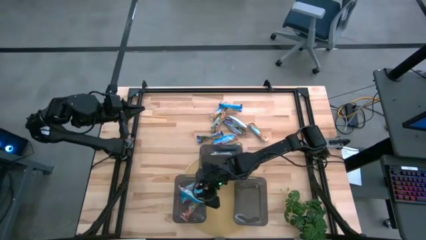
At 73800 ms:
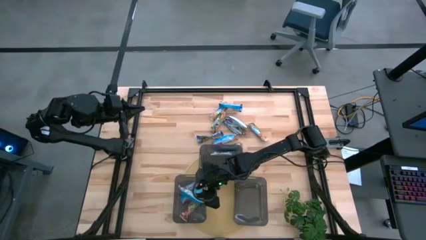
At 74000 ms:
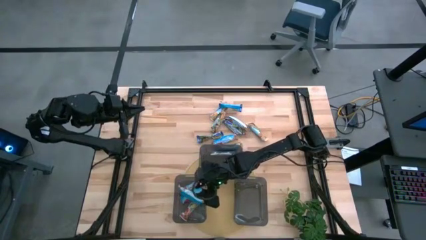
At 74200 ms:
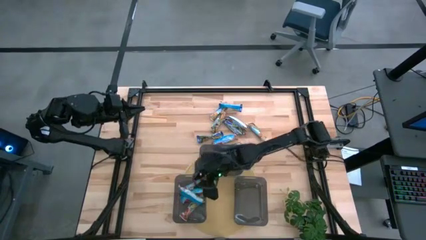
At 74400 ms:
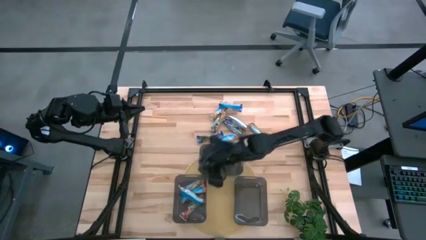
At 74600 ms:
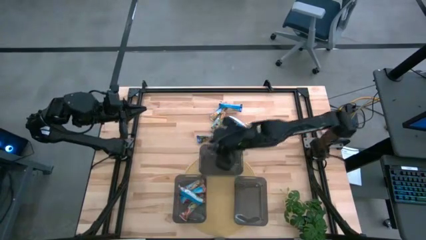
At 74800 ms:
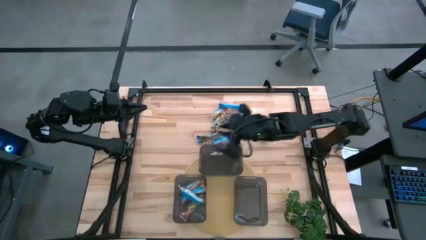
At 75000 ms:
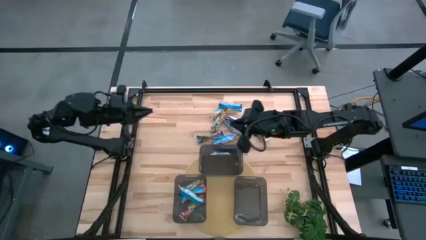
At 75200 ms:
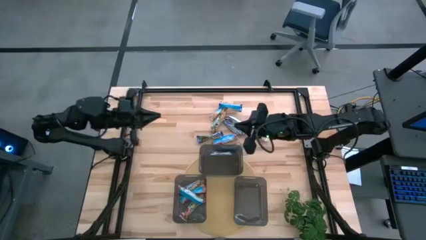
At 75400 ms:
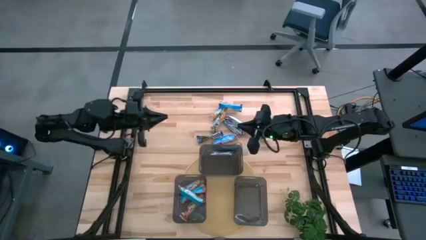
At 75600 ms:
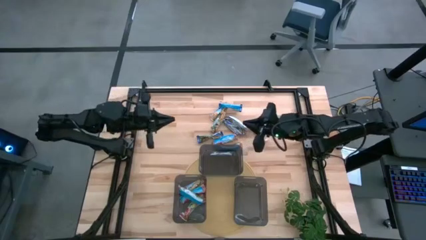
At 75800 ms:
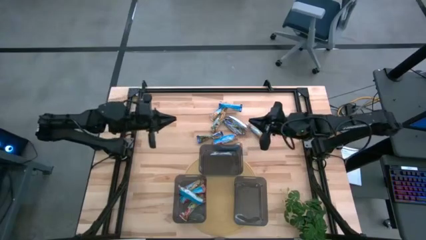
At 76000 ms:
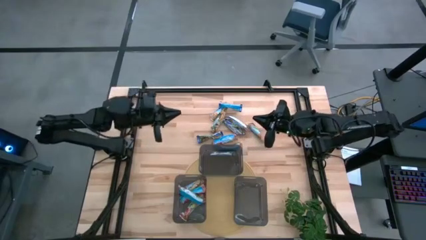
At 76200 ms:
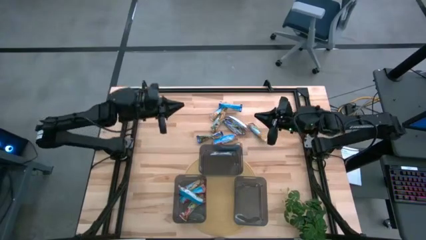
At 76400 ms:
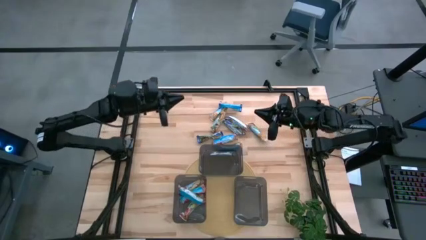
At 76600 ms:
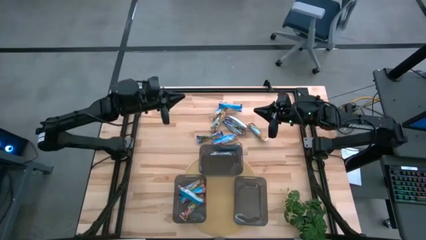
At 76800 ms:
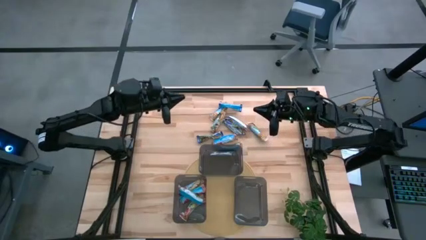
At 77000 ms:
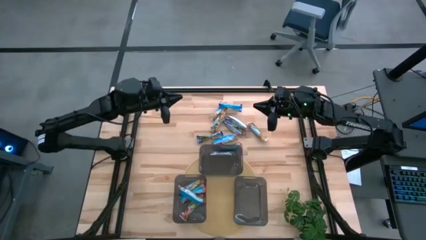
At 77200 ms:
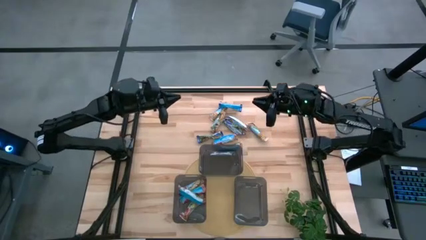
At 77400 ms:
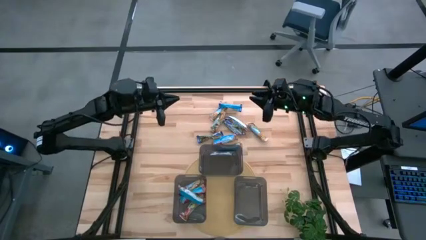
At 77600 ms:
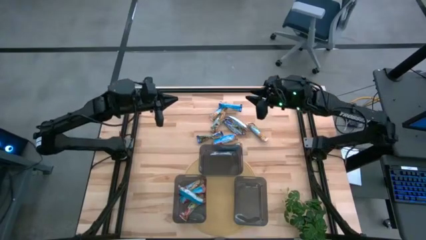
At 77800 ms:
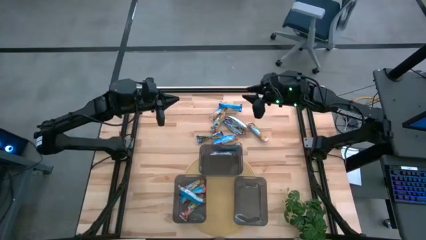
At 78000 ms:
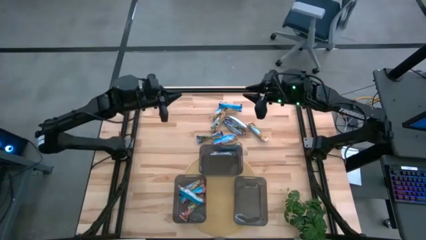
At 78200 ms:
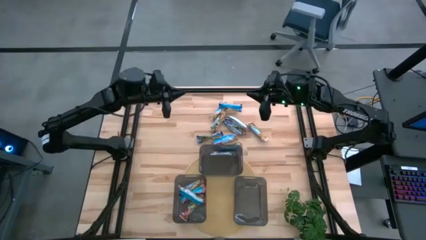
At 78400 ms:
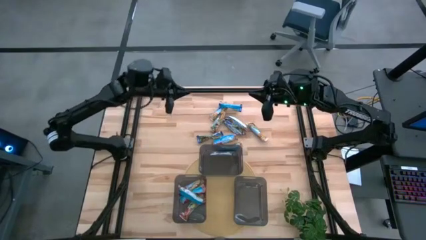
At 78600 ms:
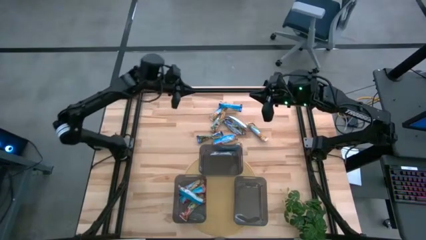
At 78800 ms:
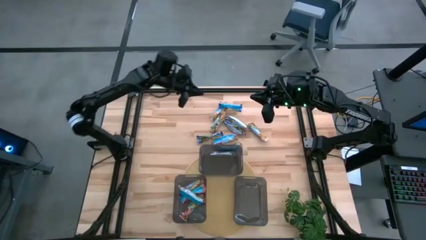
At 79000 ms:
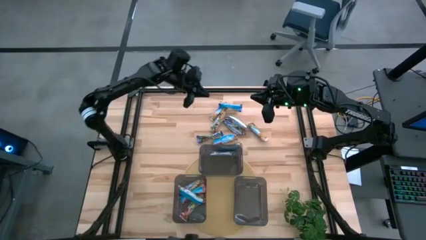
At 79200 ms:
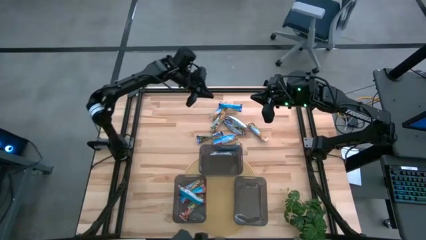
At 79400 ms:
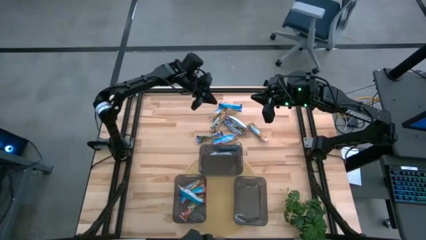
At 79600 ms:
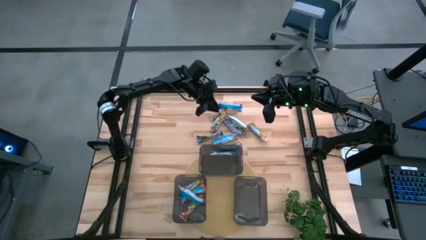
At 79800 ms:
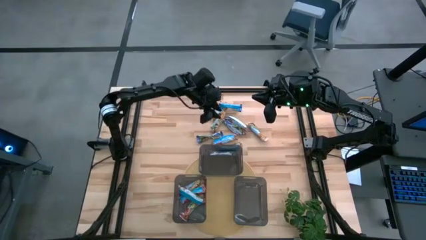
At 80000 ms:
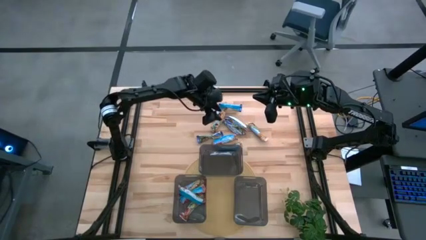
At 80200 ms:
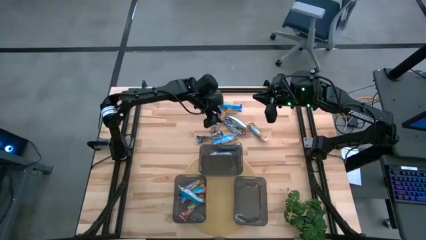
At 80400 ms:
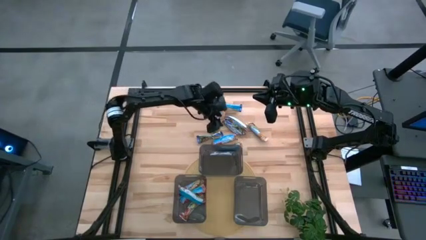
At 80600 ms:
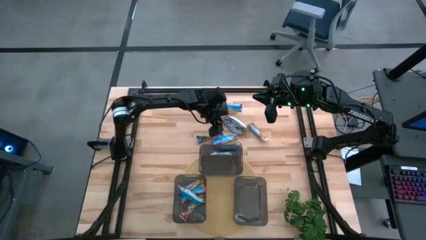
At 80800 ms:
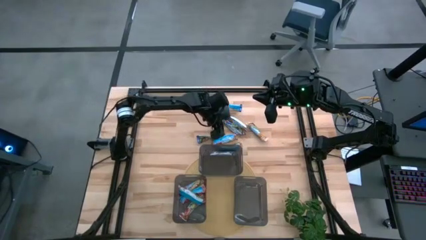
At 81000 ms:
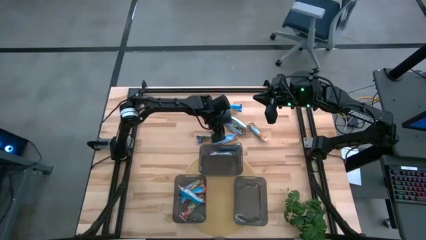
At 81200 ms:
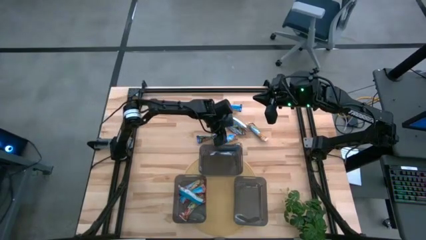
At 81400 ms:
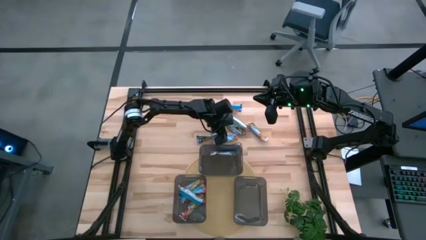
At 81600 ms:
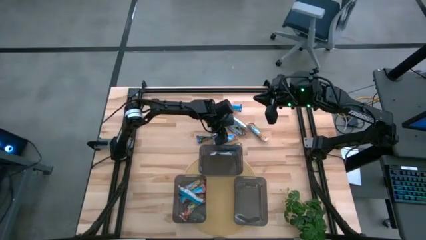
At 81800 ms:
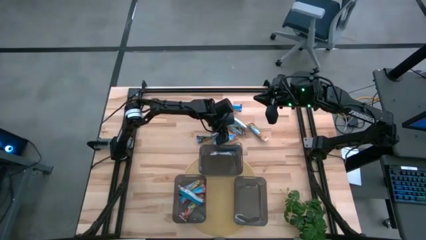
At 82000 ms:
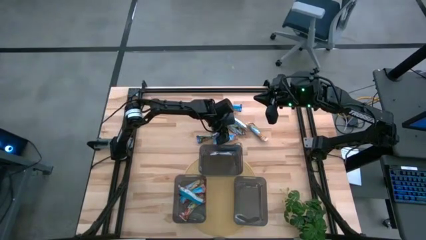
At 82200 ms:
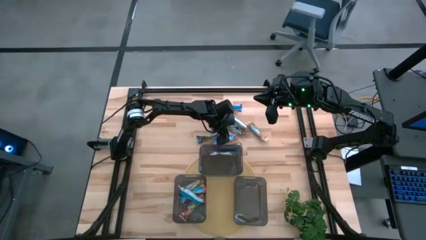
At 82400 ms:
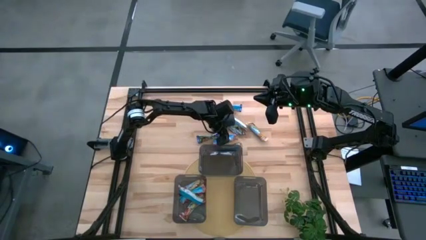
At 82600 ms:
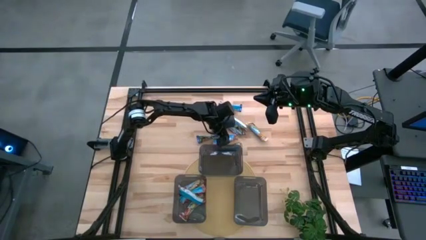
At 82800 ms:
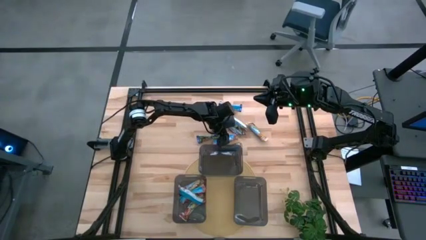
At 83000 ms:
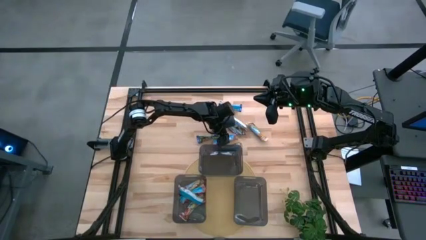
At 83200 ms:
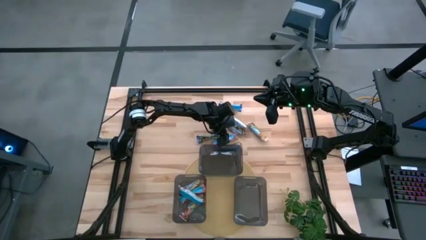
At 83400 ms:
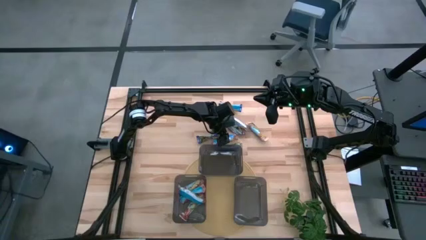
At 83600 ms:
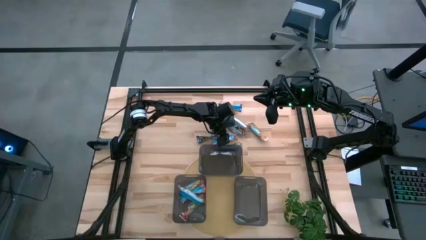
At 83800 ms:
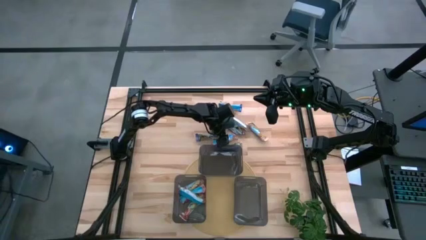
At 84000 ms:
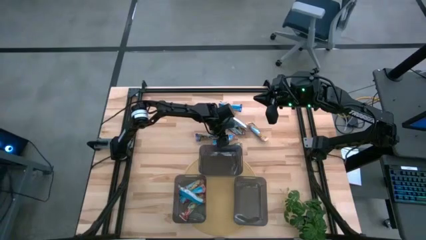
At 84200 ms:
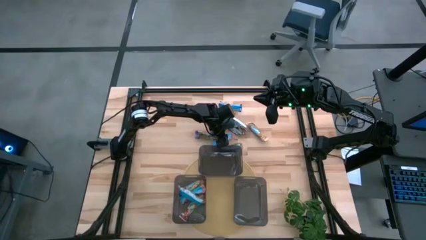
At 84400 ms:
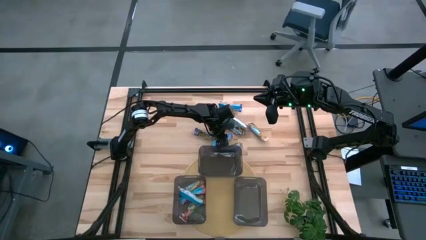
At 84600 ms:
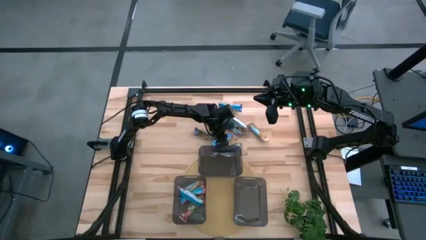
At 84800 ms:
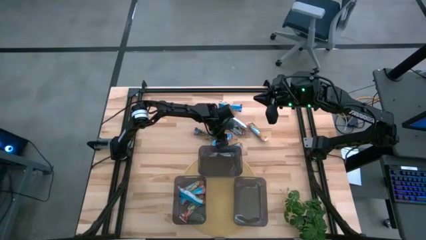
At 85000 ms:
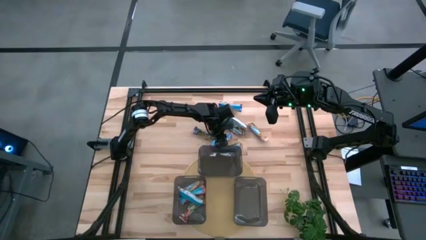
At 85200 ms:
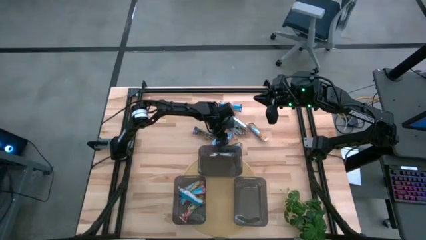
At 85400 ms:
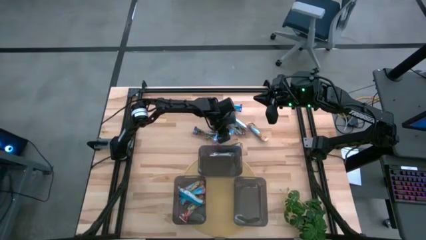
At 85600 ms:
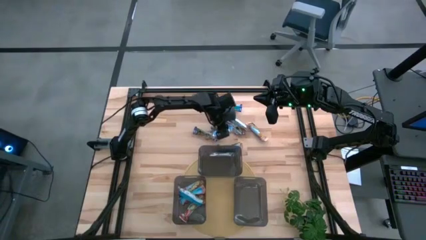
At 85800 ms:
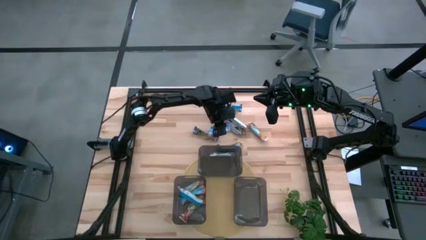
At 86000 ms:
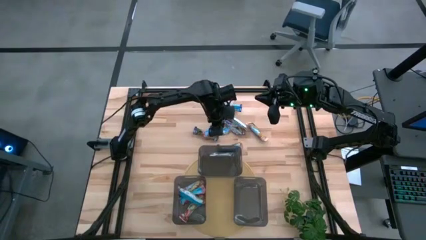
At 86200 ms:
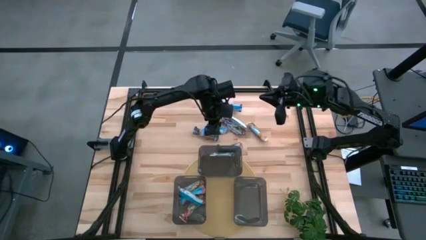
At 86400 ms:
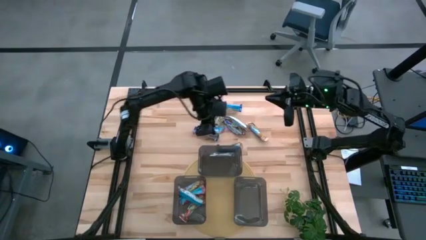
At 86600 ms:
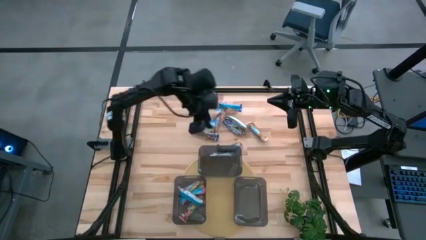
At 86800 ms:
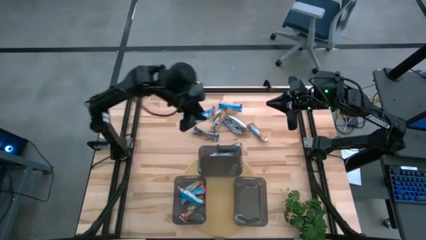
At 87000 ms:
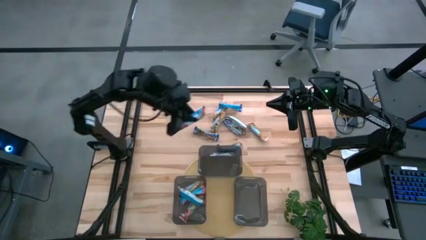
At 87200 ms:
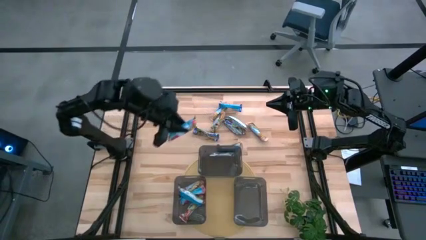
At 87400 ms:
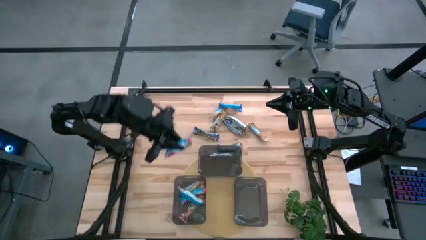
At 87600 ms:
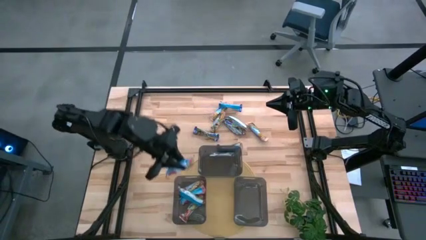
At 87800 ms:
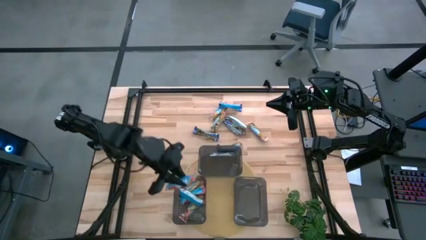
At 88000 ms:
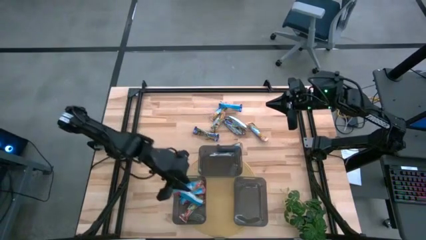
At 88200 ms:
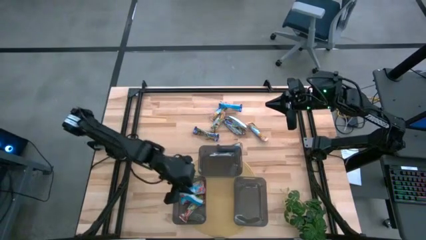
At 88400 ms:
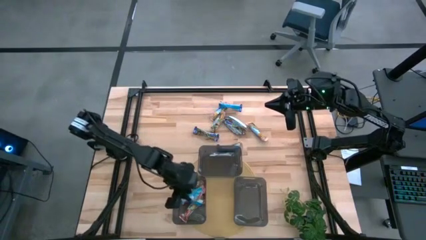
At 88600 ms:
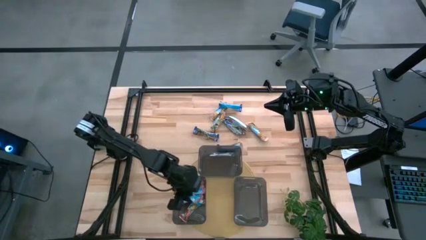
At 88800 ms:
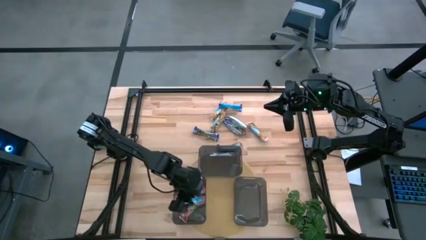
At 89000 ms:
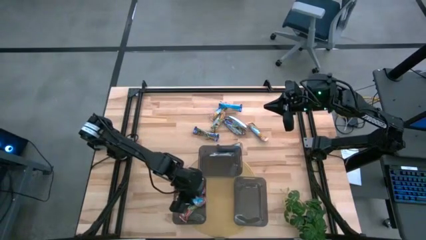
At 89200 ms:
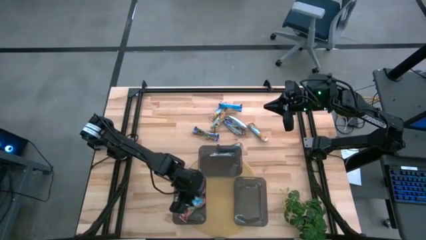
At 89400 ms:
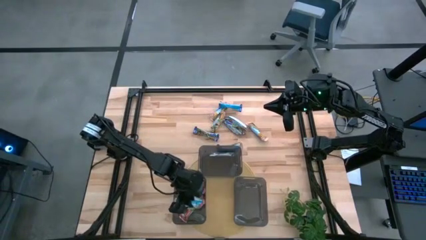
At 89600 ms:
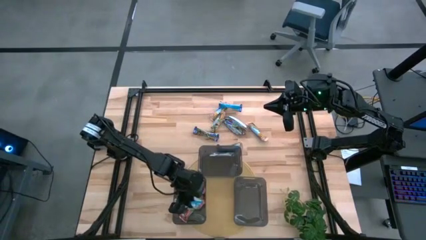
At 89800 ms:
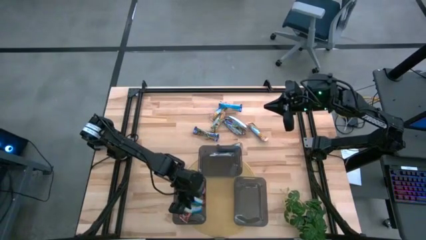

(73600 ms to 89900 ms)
Task: Pick and place Granola Bars by type
Put the red granola bar into the bottom left black bin
